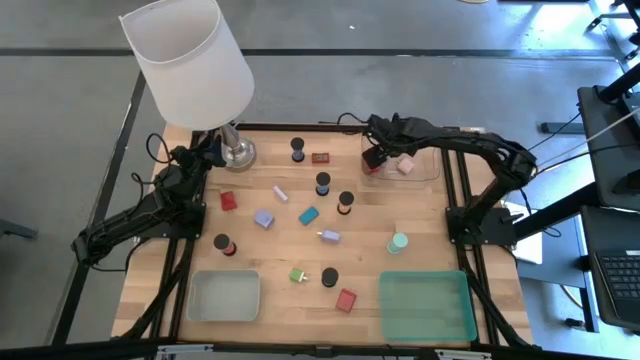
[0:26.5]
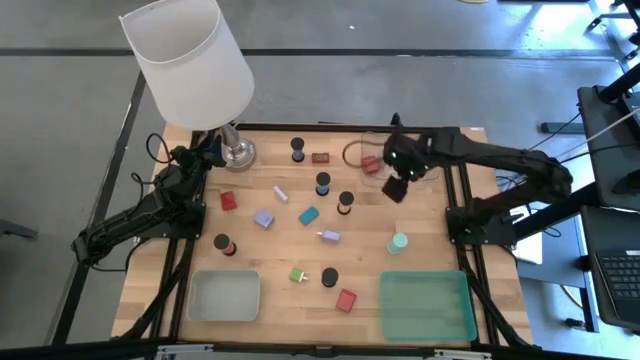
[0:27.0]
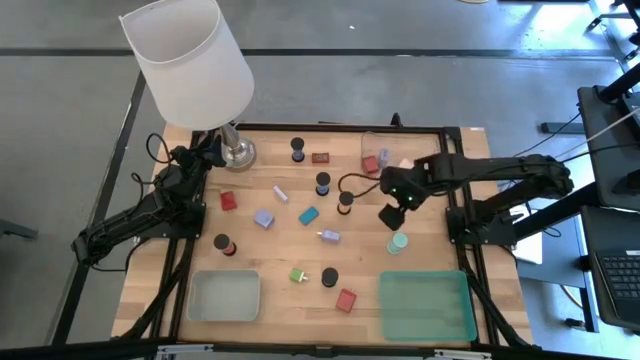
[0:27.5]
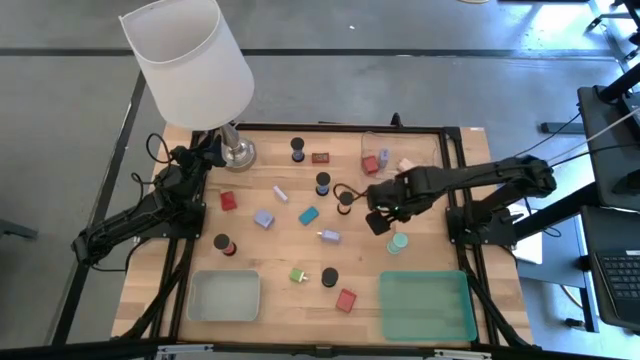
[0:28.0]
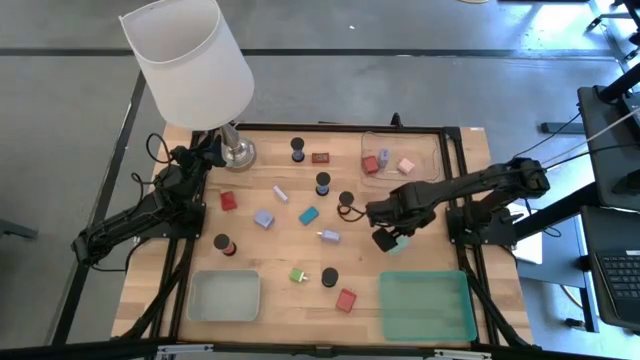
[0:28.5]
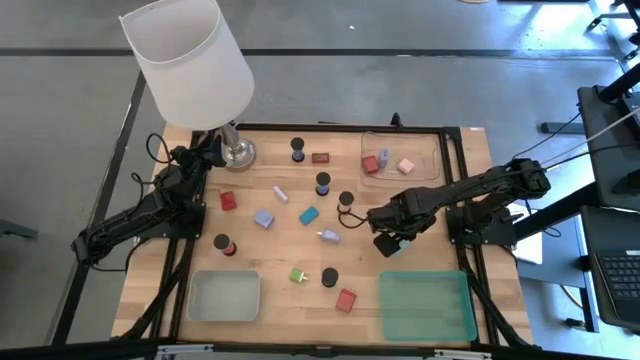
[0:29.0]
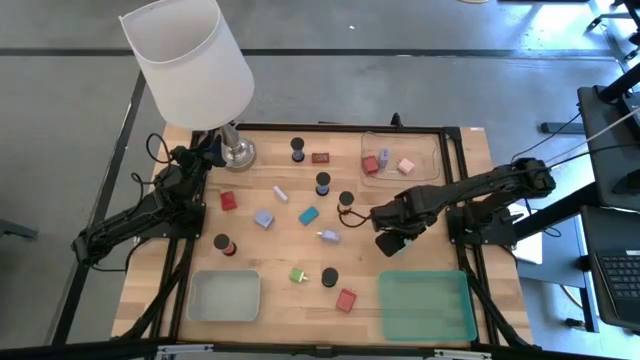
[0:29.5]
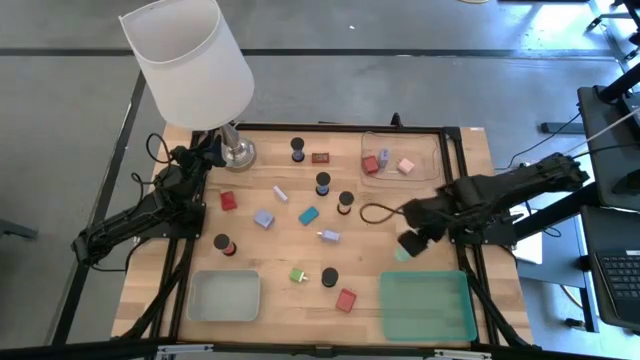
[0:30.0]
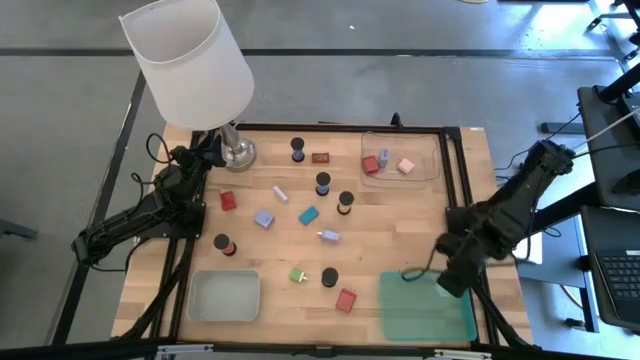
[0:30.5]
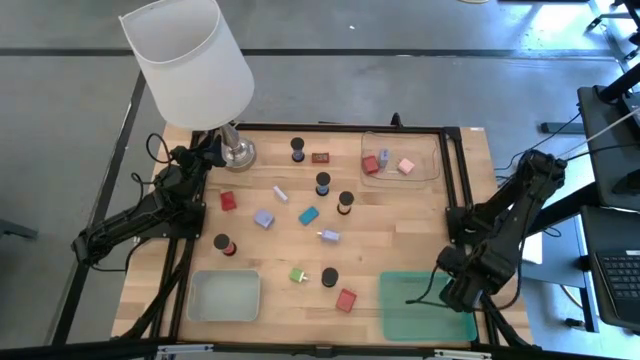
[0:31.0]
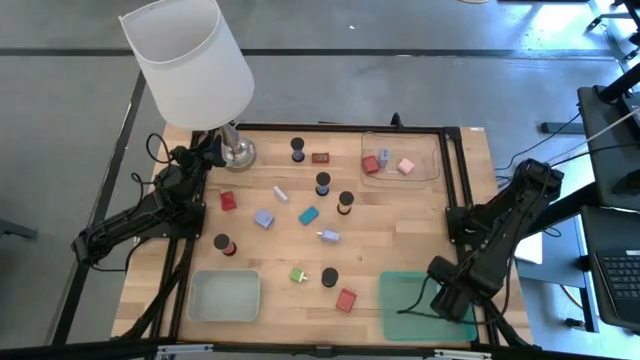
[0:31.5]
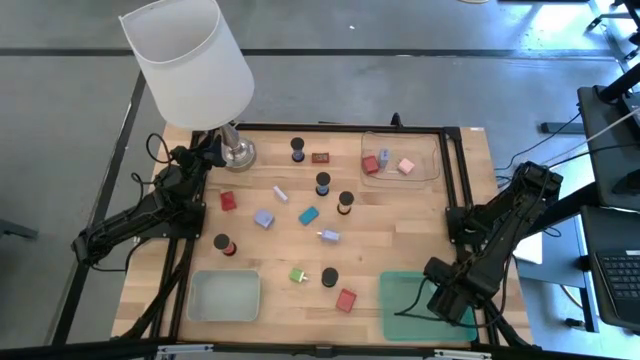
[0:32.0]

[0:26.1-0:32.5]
Task: Pick & Place Office items
Put the light green hourglass into the green bin

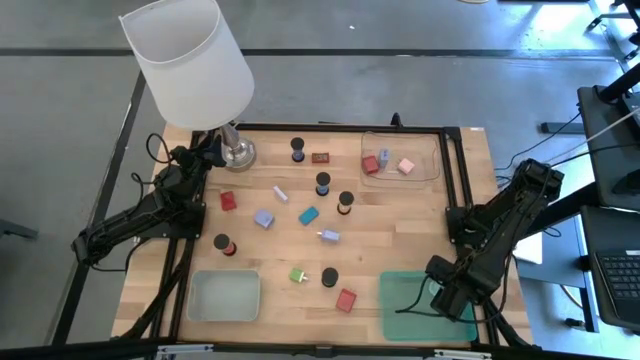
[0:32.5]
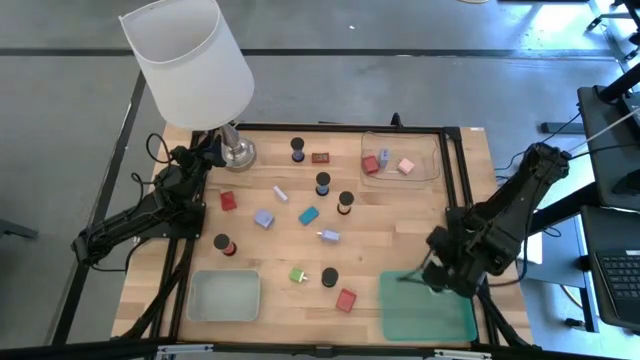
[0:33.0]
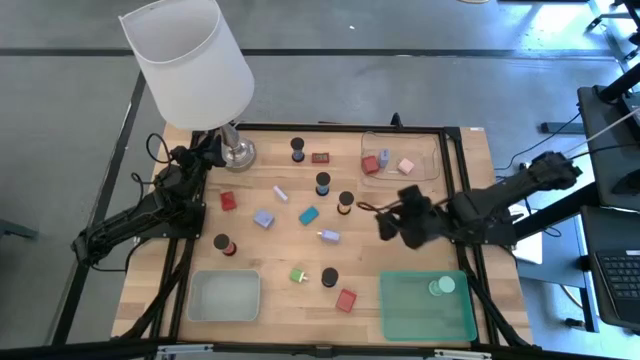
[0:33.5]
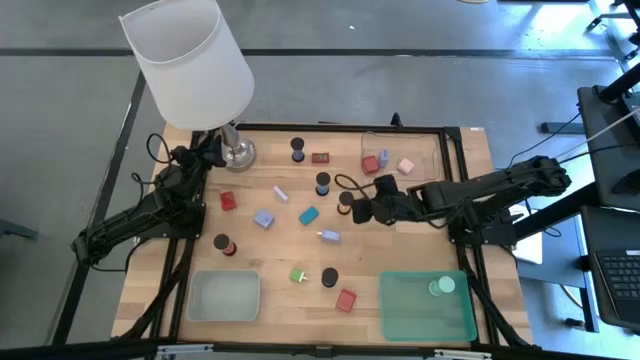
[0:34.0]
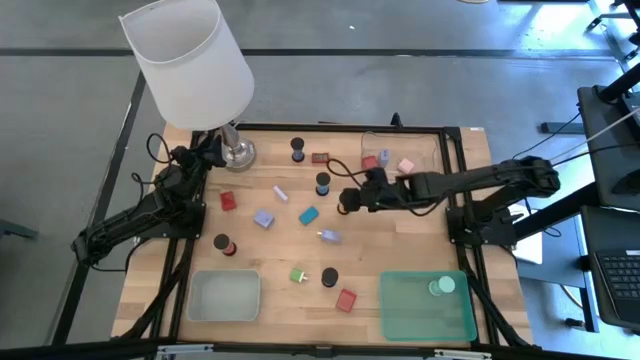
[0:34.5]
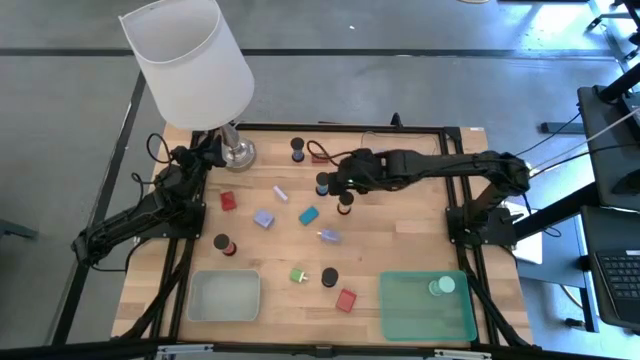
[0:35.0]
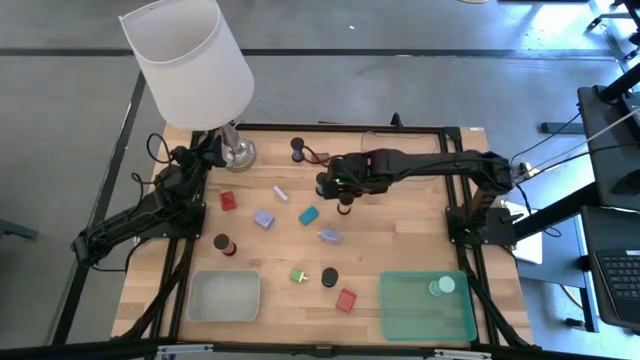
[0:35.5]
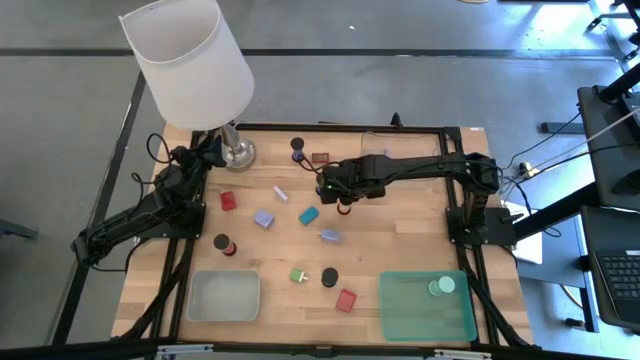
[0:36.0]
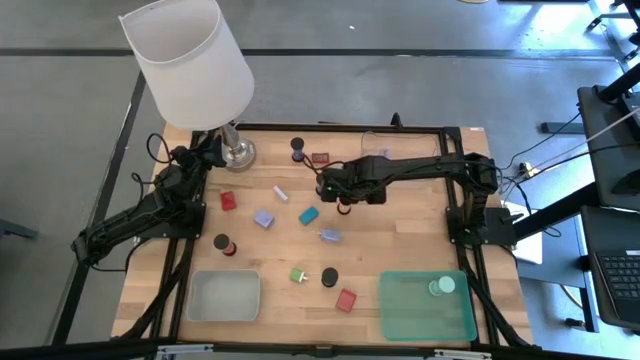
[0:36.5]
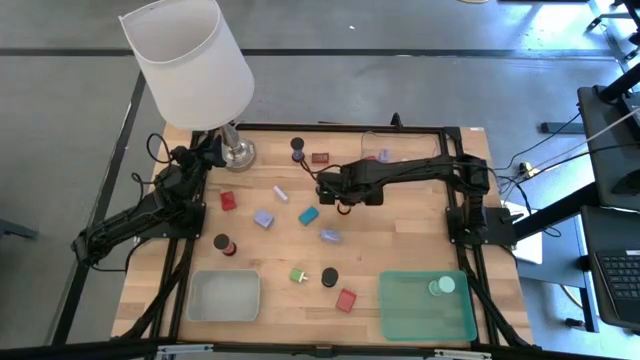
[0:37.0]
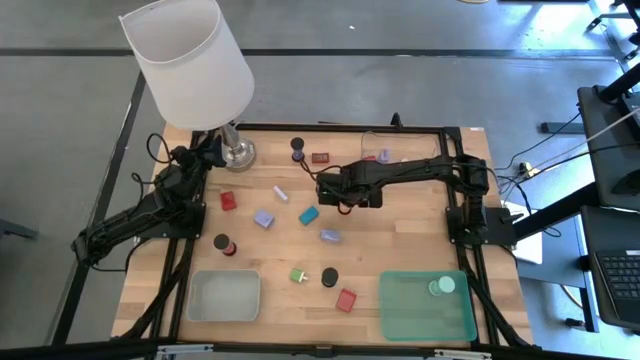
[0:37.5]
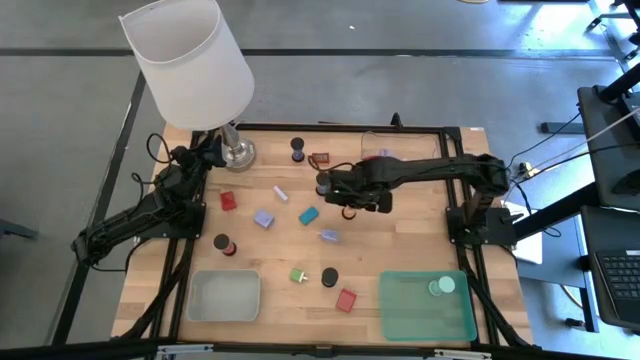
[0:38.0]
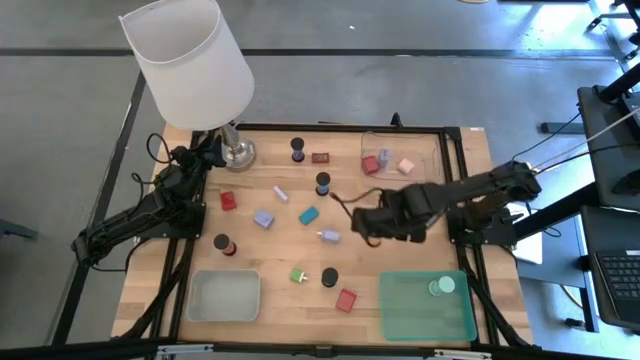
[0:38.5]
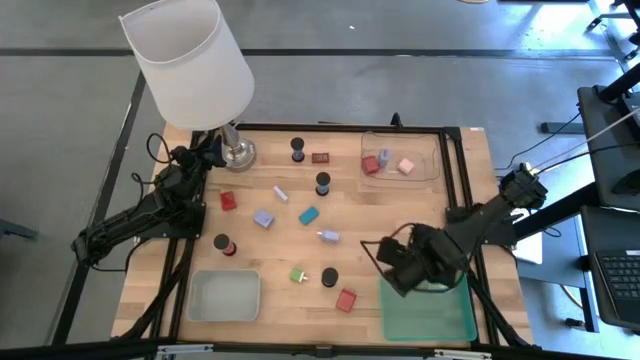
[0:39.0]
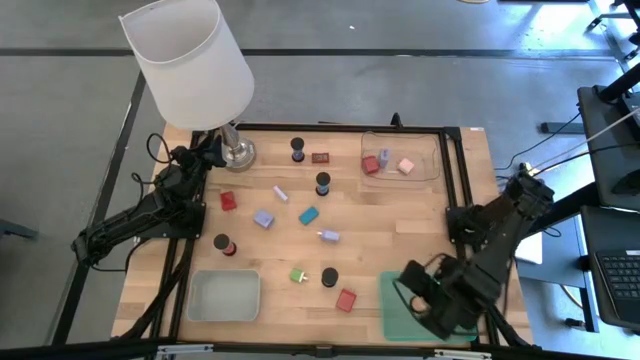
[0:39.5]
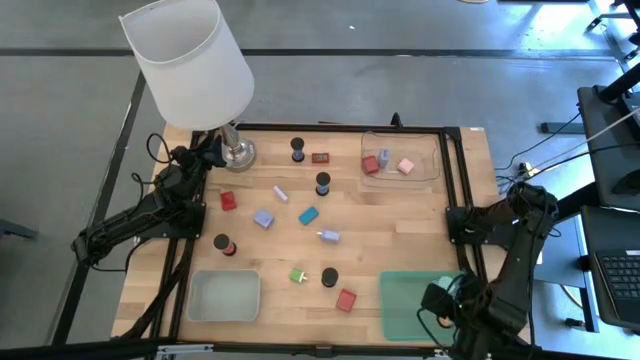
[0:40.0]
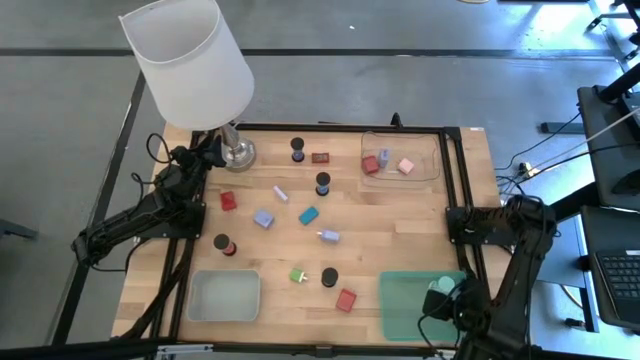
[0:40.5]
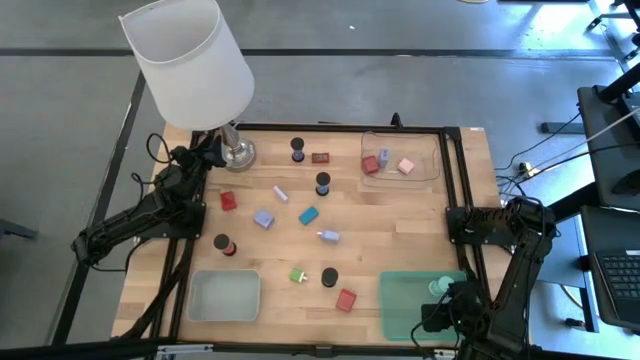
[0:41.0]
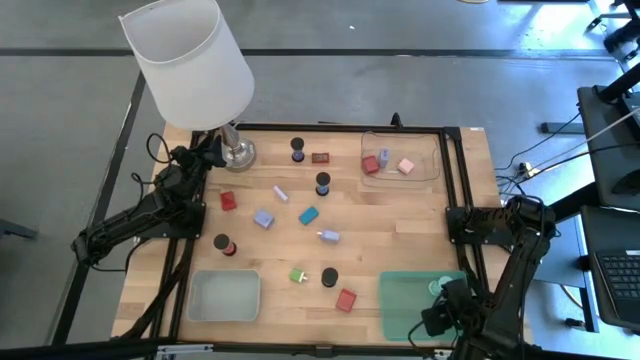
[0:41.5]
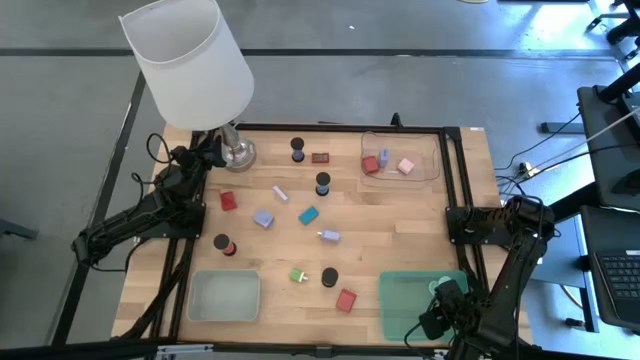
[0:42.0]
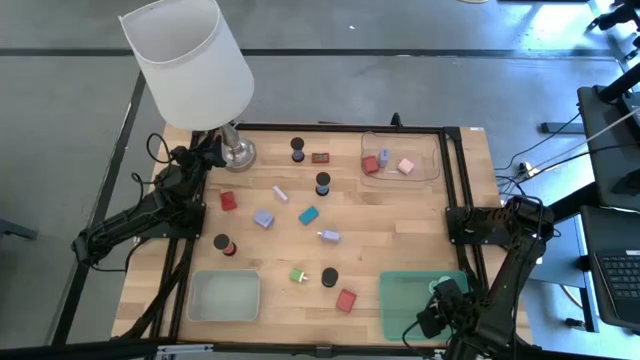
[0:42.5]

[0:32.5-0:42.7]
Put the orange hourglass into the green bin

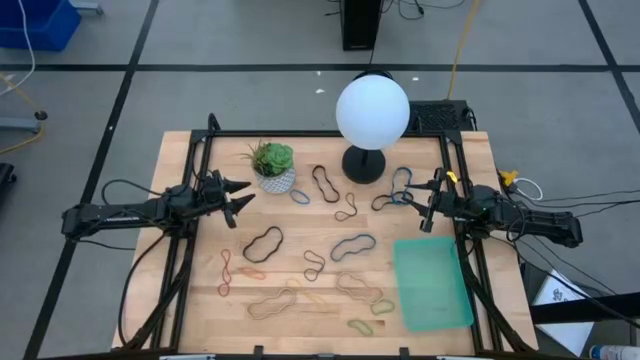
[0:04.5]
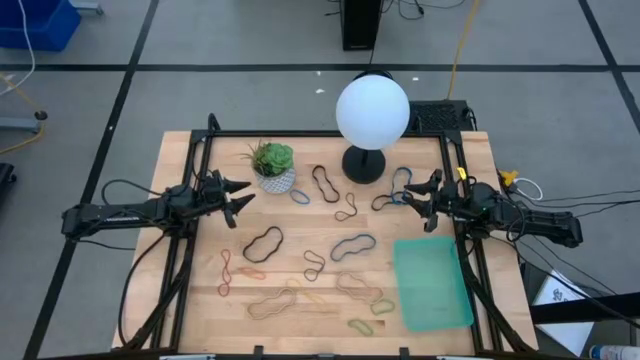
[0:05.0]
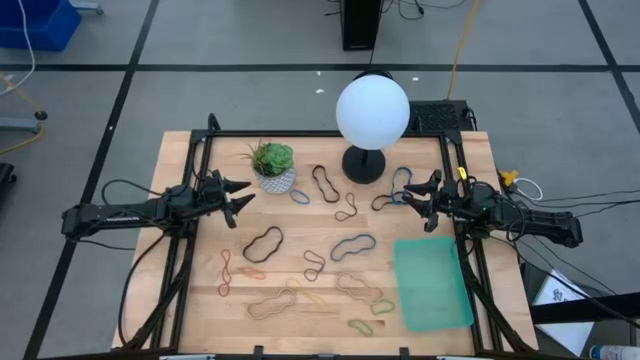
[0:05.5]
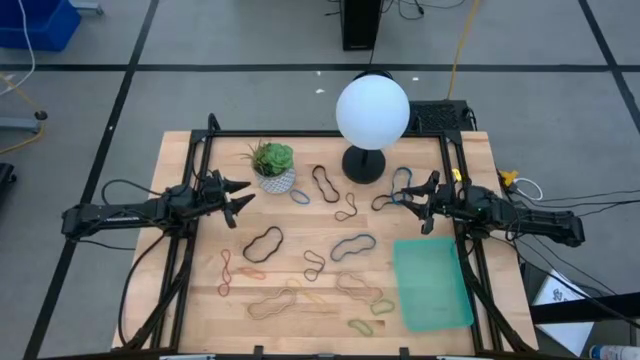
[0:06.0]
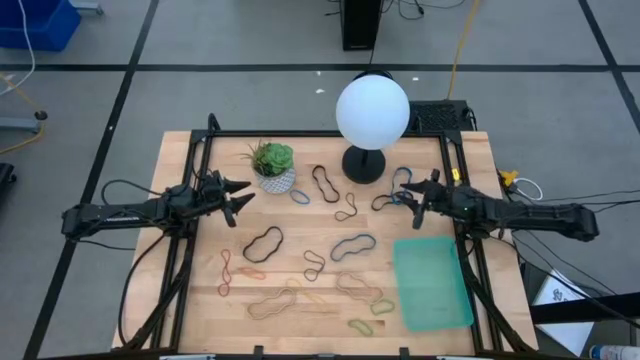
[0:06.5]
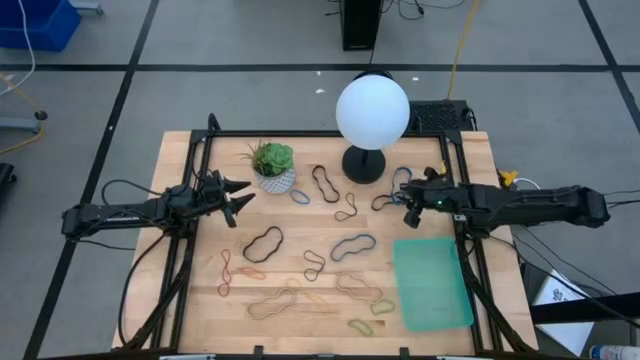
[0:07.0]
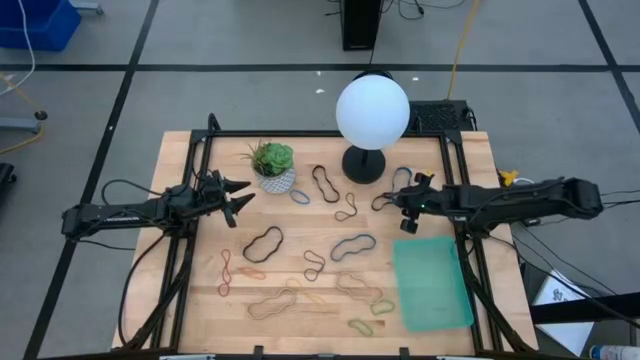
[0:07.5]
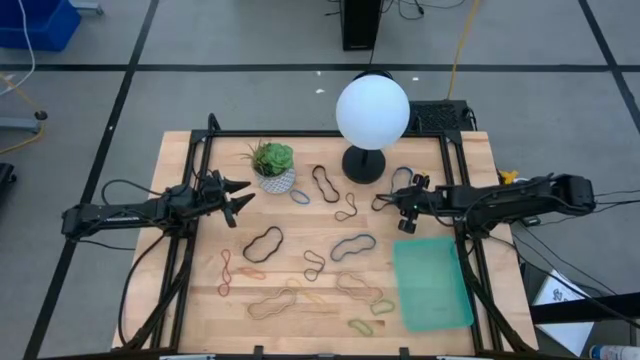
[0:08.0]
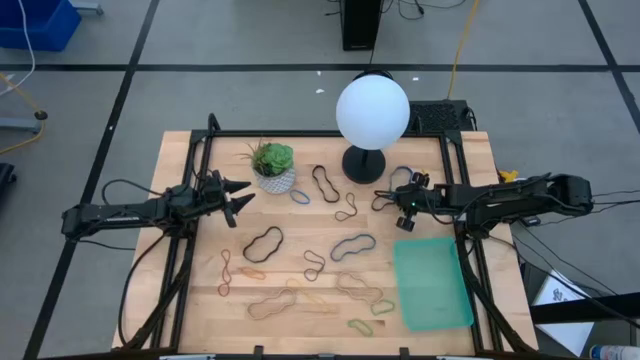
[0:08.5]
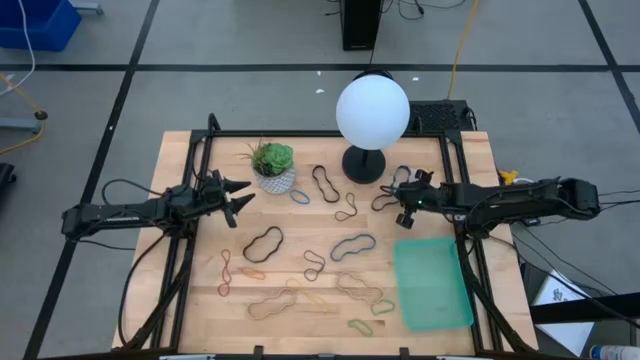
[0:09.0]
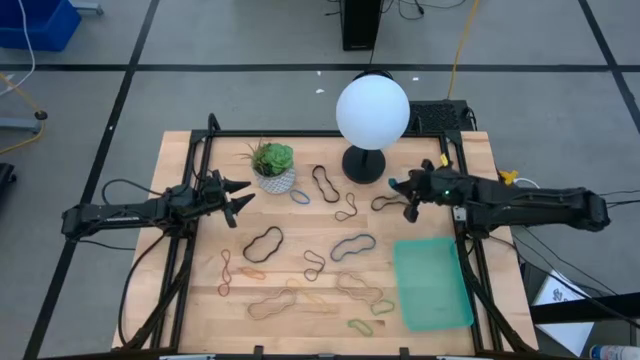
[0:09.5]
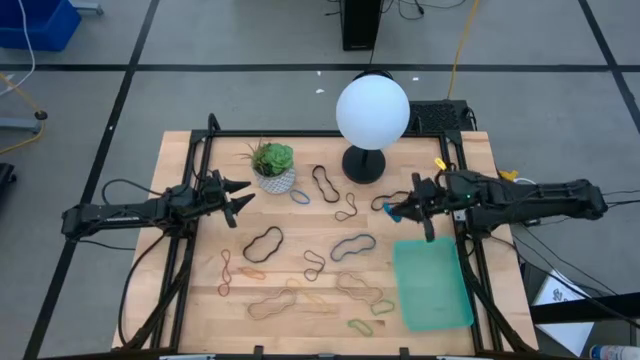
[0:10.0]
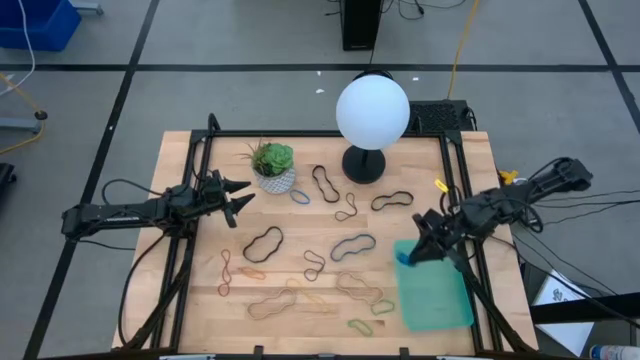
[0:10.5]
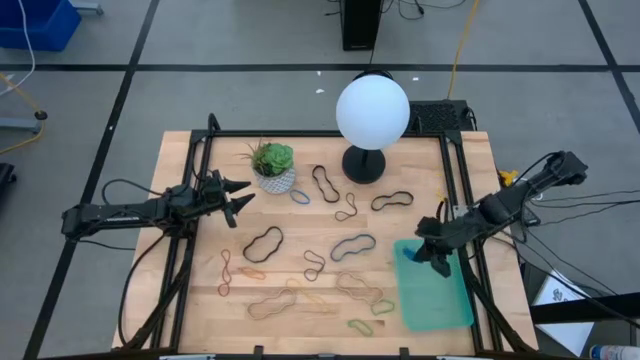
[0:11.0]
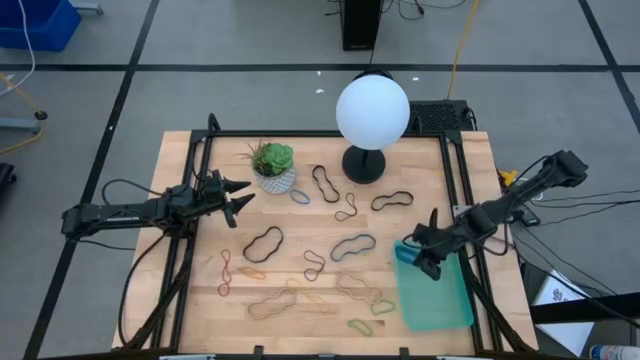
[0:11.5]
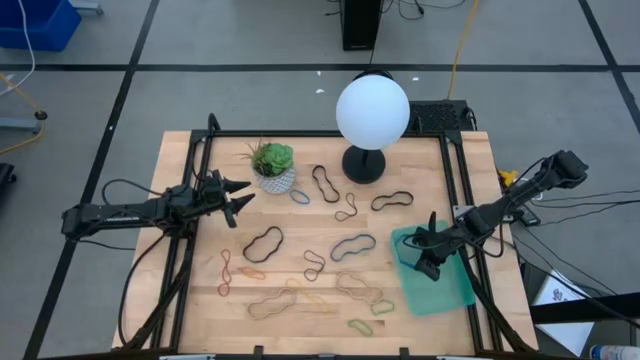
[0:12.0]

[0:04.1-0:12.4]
Task: Pick and place rubber bands into bin
Put the top blue rubber band into the bin
